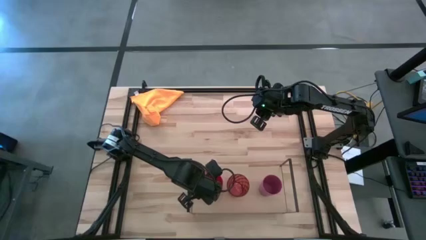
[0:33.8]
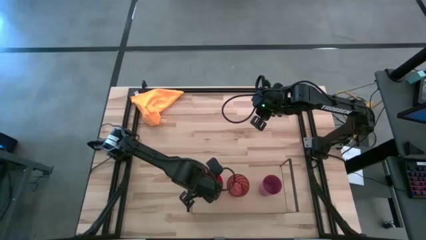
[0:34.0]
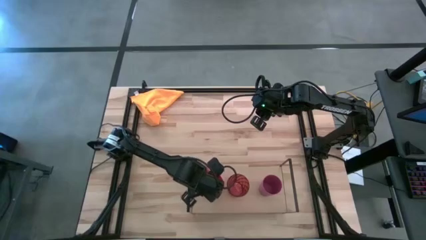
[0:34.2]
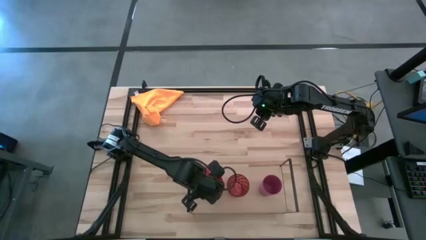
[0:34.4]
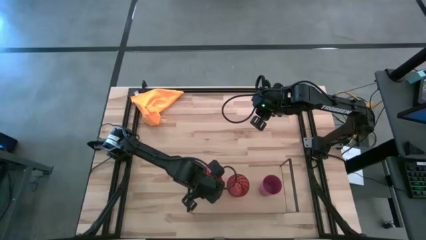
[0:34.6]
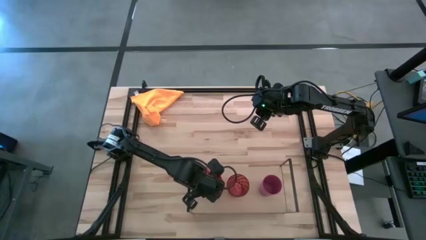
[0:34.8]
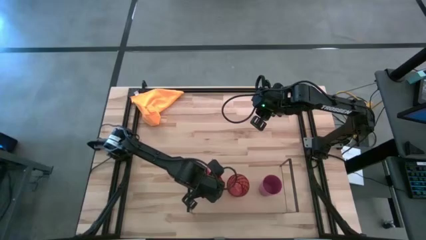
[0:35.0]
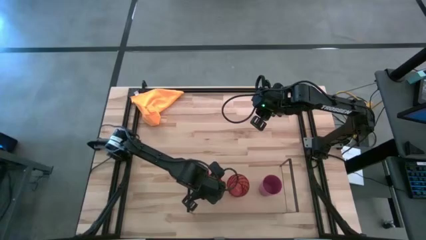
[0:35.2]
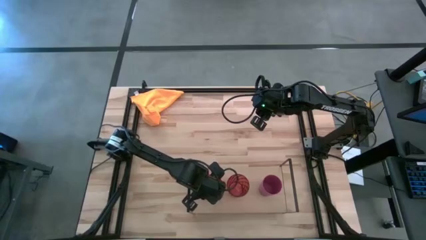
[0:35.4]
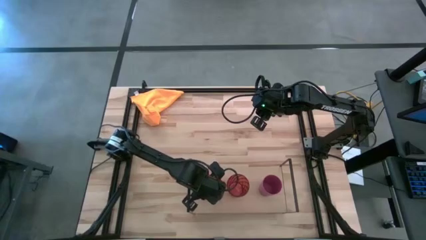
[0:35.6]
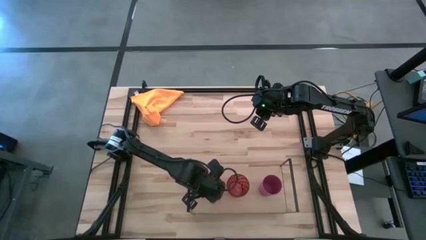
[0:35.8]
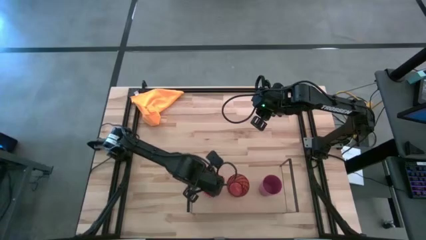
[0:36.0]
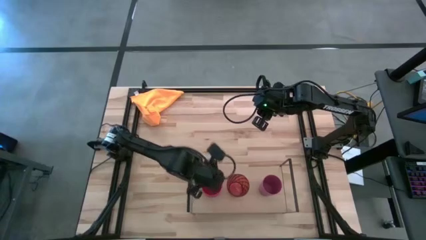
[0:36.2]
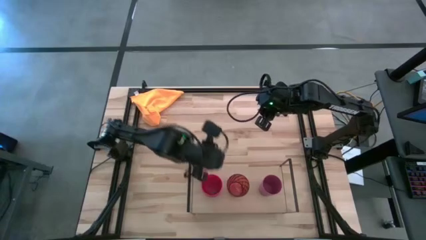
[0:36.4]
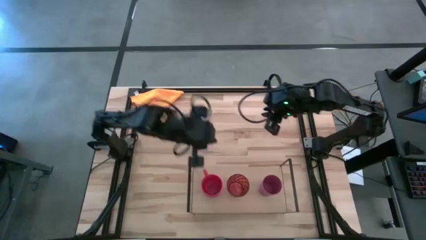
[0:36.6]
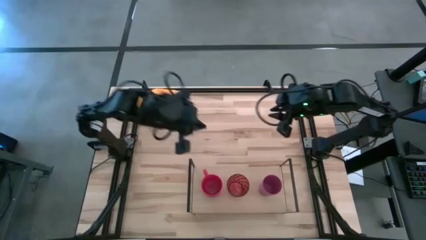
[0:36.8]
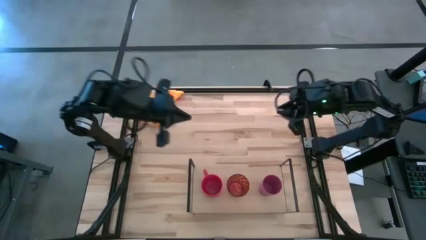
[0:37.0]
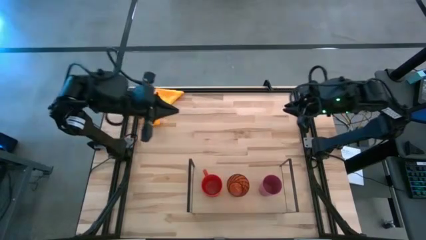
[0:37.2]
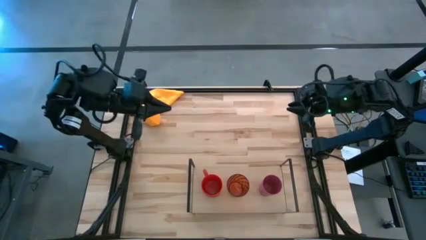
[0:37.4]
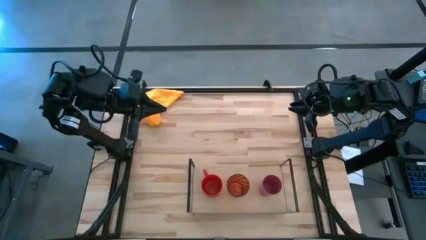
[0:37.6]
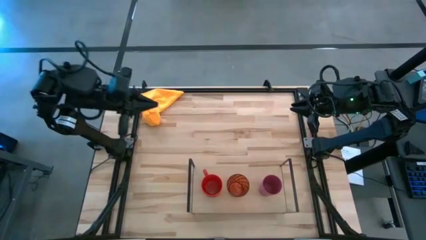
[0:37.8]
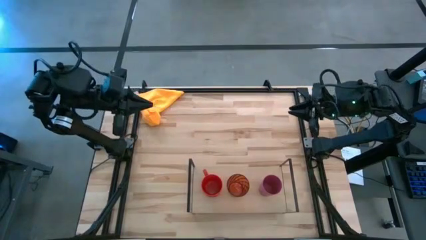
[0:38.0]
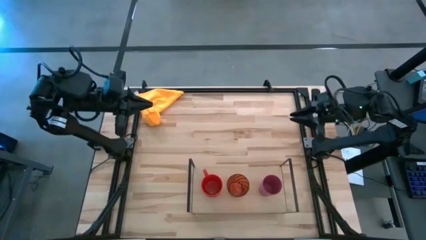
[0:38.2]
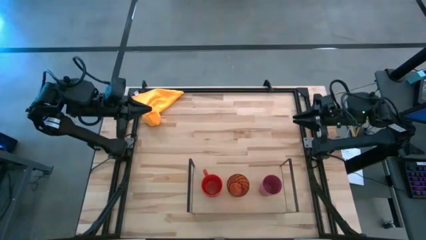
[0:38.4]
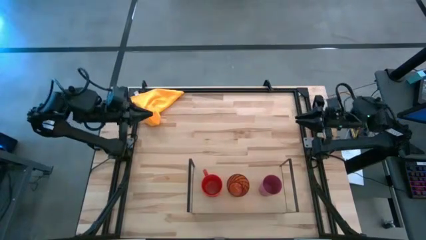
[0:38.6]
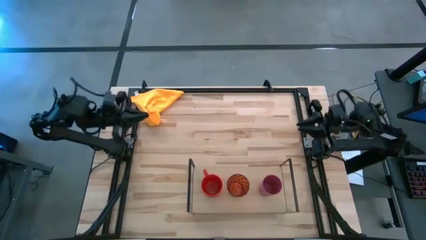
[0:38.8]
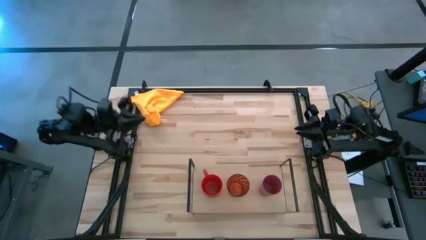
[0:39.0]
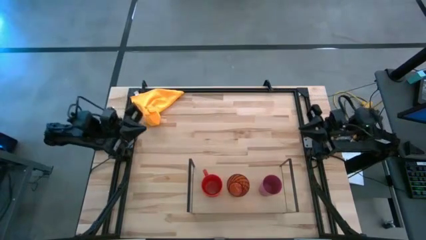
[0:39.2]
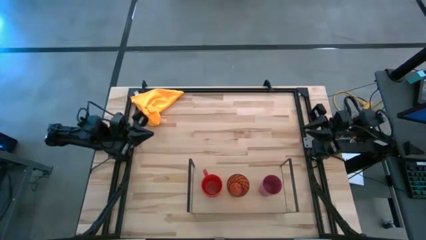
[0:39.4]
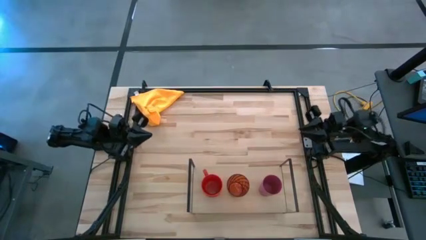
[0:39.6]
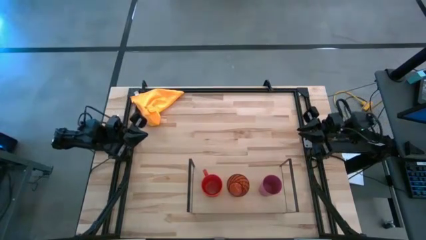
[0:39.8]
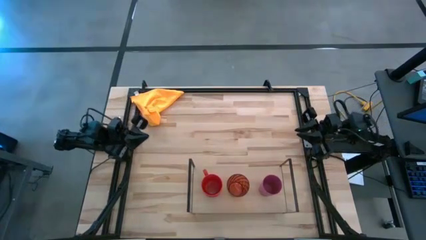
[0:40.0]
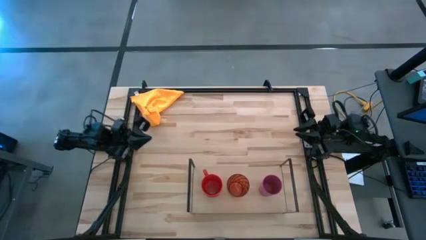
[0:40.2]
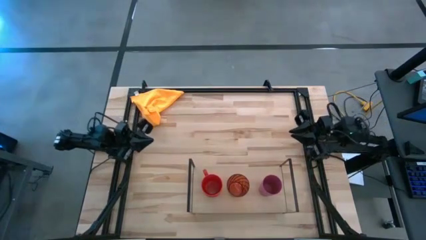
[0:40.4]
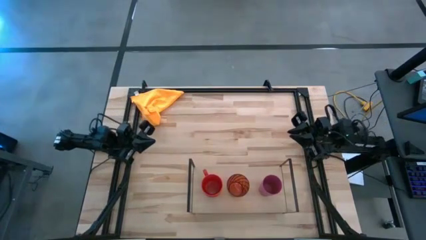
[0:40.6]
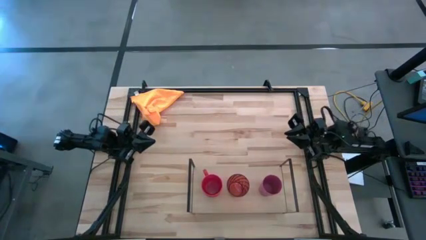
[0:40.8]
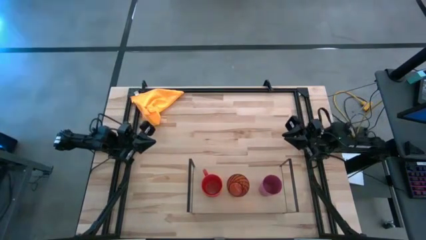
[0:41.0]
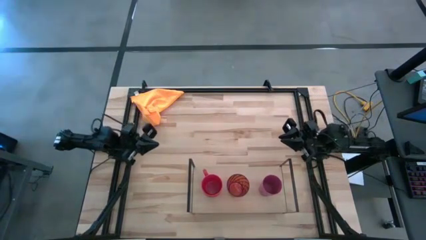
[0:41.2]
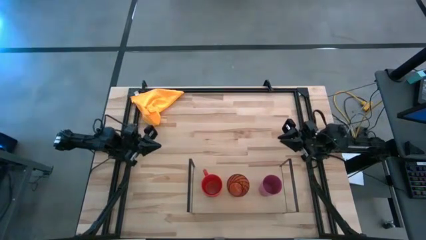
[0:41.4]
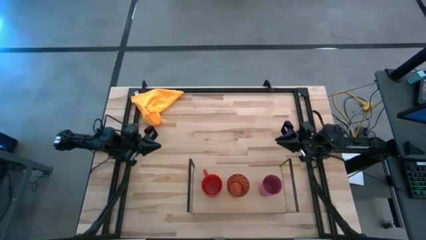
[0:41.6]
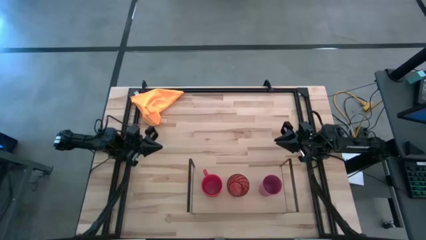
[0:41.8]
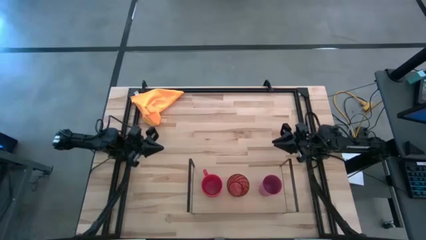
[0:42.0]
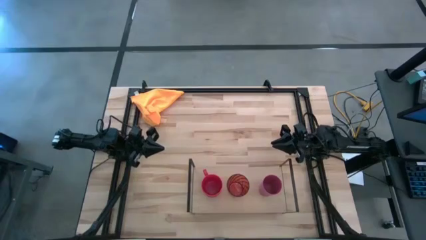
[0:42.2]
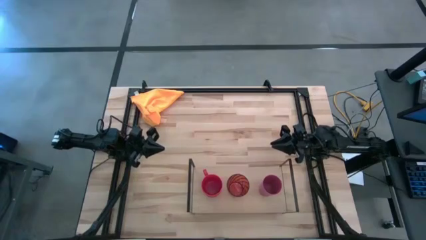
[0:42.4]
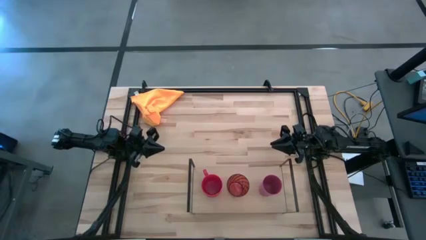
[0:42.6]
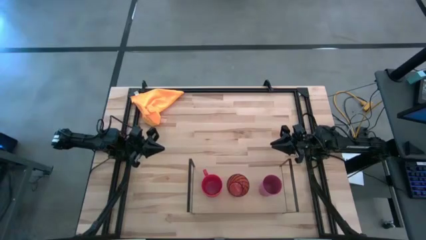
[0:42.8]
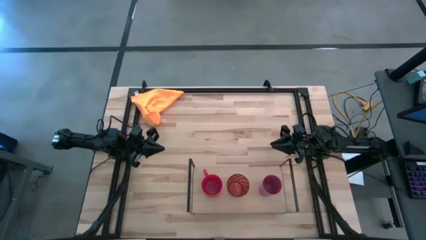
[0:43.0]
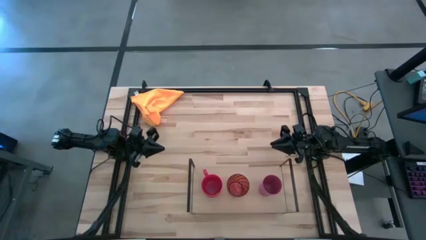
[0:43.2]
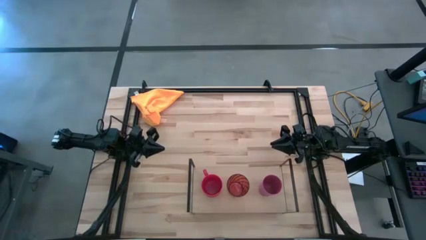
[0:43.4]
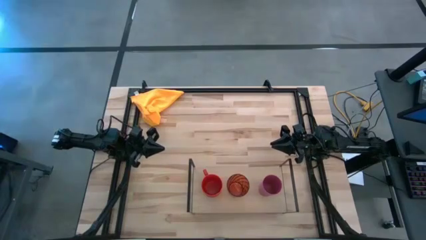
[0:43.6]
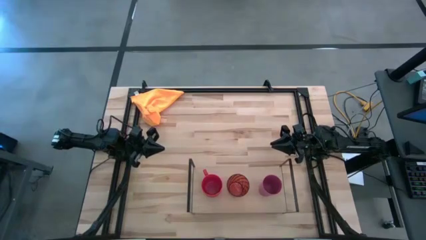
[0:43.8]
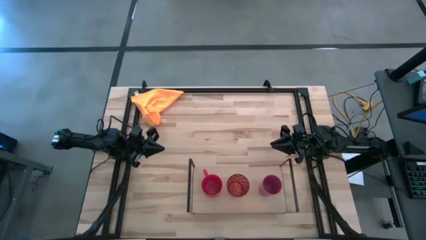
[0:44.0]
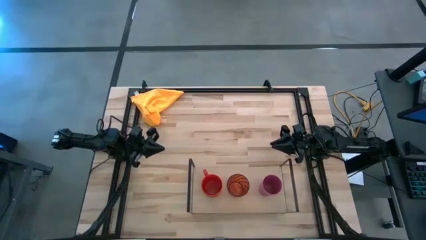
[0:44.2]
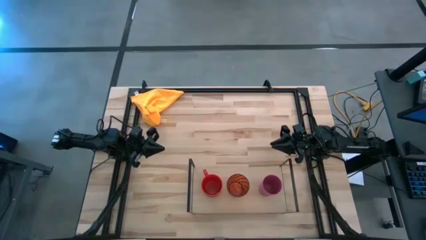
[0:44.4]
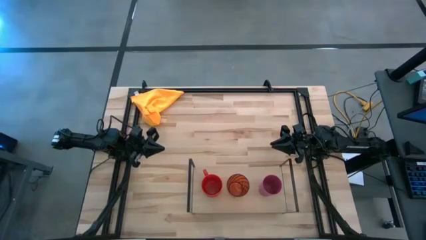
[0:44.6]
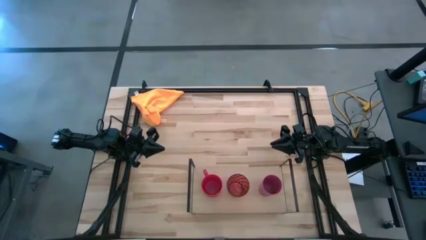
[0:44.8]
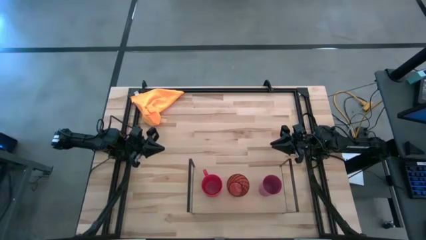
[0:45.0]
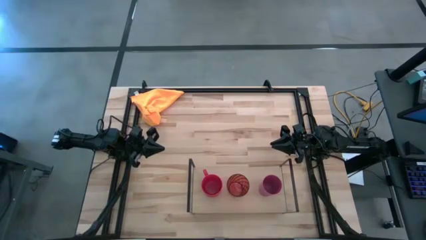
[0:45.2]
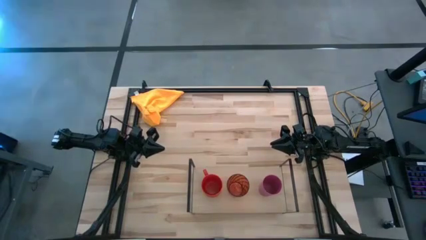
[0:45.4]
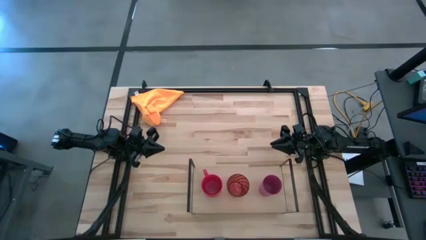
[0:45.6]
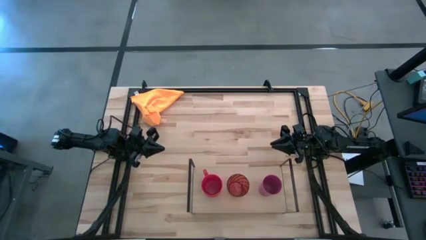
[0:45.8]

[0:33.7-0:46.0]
Task: Stack small to large cups/mugs on shelf
Return to Home Position

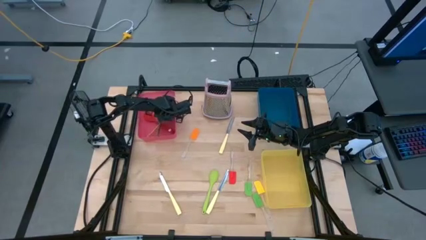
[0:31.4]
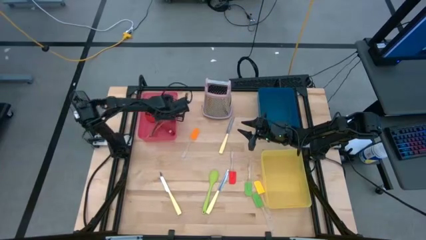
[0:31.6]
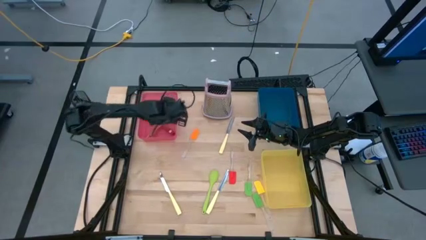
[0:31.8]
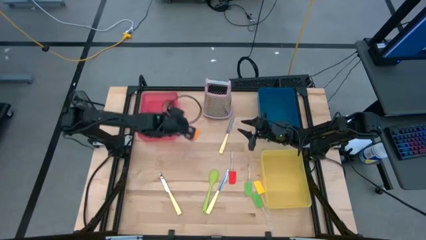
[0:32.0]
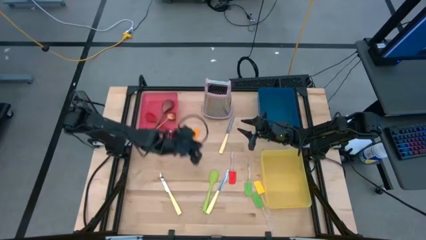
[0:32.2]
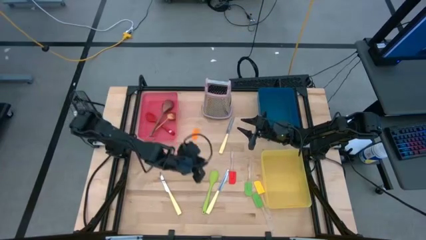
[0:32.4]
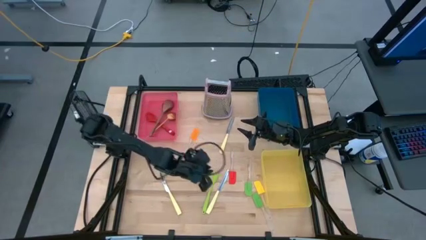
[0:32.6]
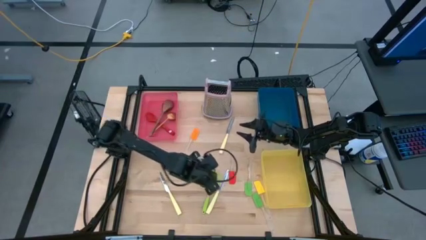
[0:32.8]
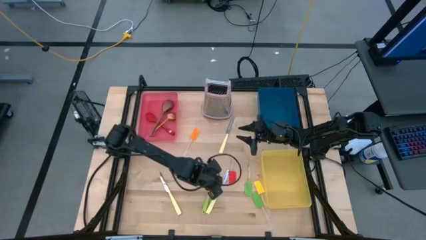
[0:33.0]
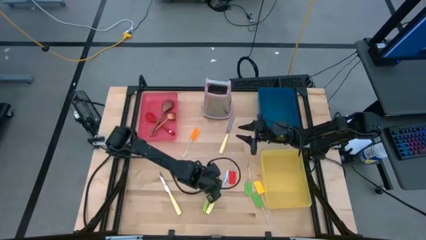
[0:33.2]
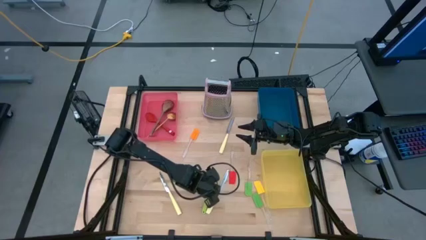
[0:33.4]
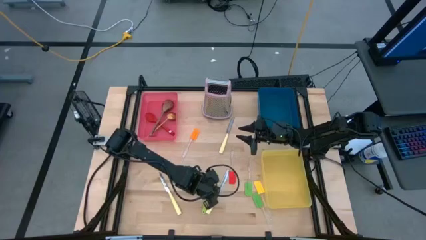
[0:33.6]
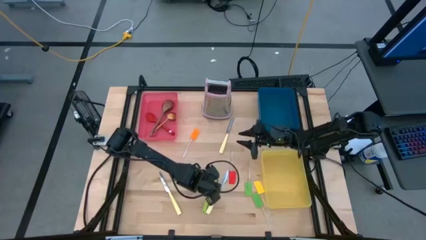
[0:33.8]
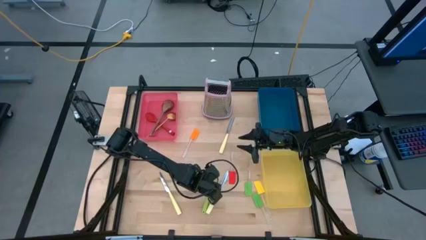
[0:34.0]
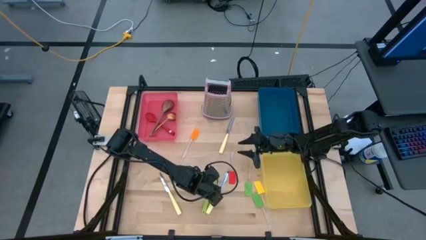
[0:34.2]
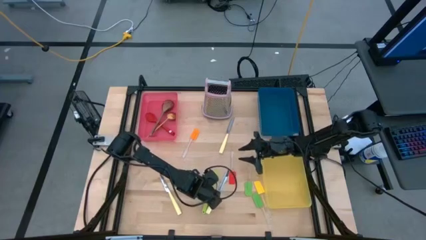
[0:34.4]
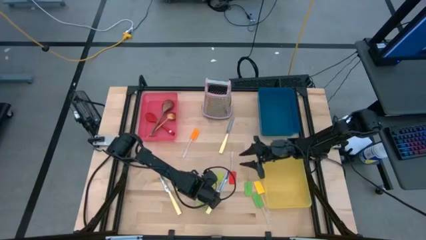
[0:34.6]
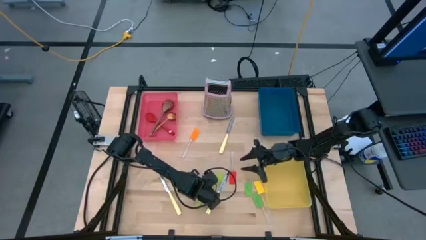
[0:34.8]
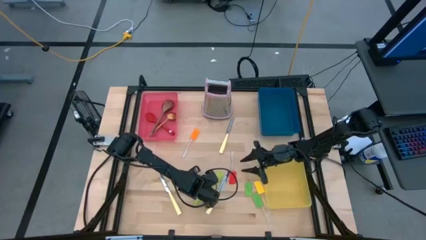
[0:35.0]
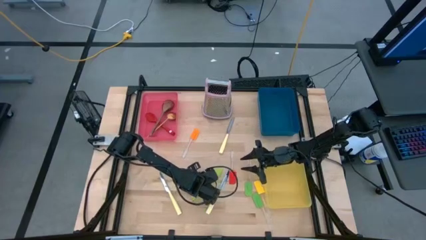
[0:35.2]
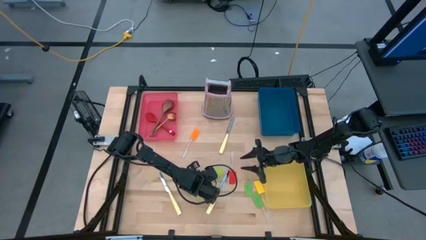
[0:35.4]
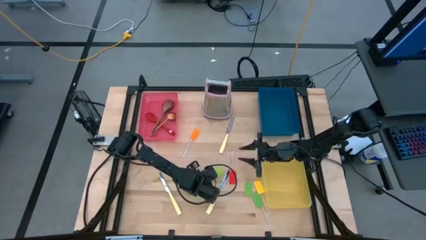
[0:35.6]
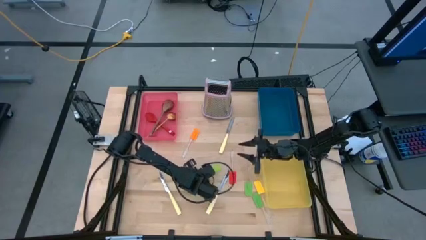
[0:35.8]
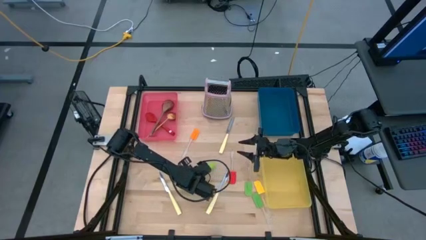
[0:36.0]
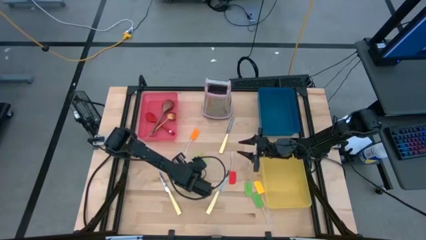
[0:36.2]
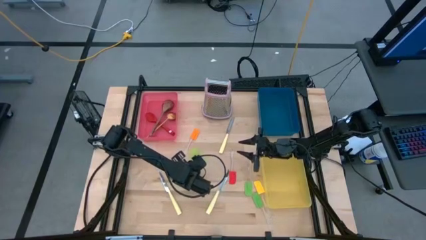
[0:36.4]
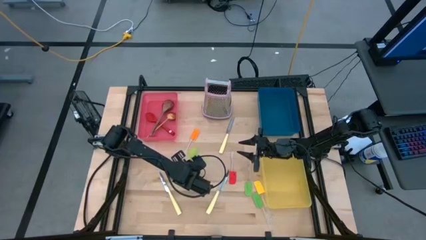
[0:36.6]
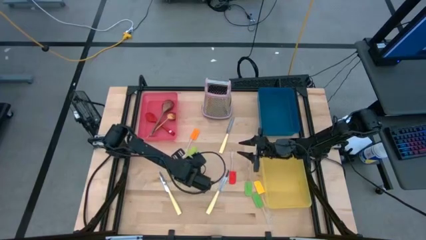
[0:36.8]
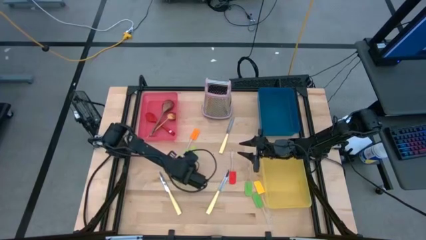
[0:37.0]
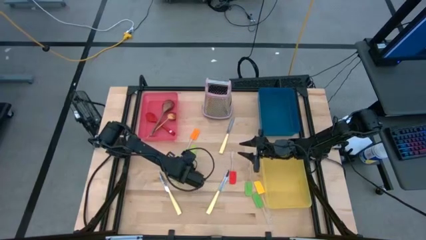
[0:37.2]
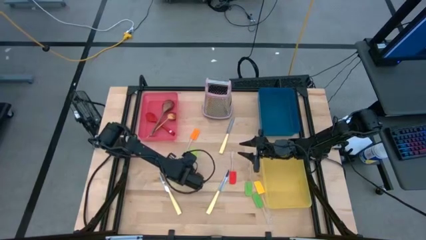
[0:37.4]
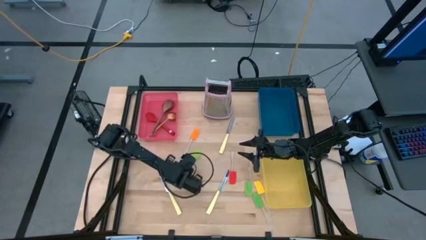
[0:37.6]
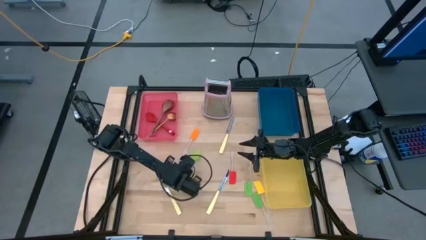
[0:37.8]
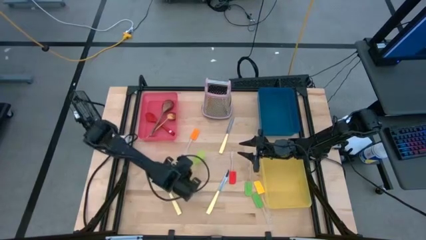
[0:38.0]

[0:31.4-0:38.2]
Task: Pick & Place Kitchen Items
Put the green baby spoon into the pink bin
